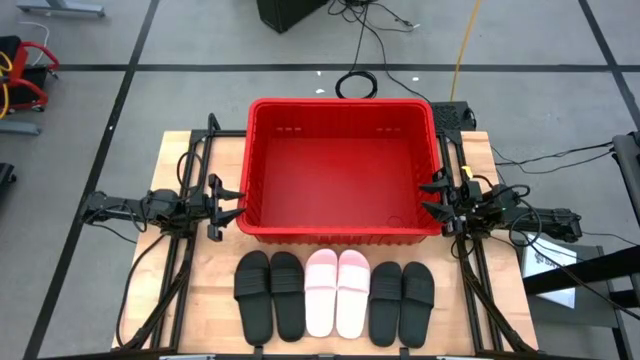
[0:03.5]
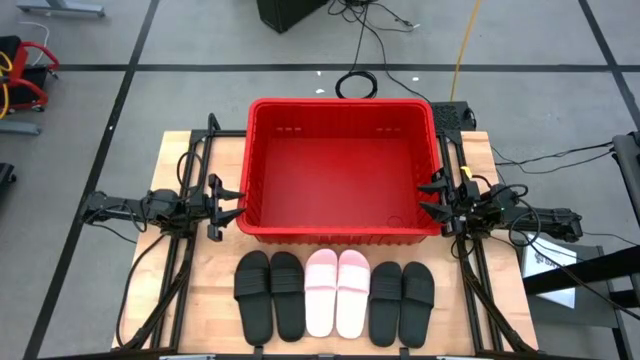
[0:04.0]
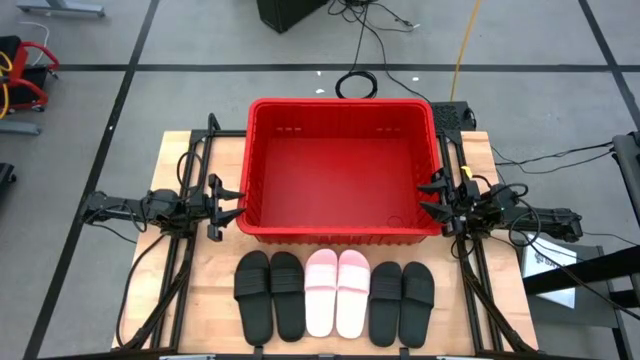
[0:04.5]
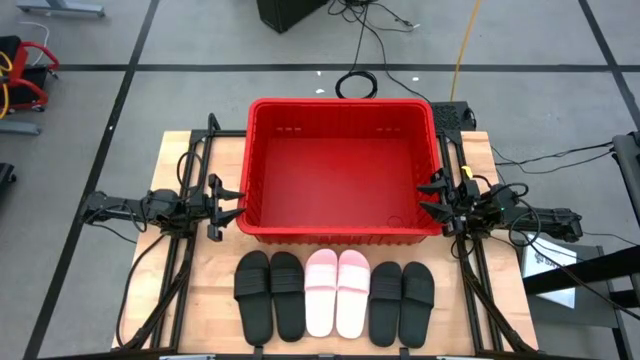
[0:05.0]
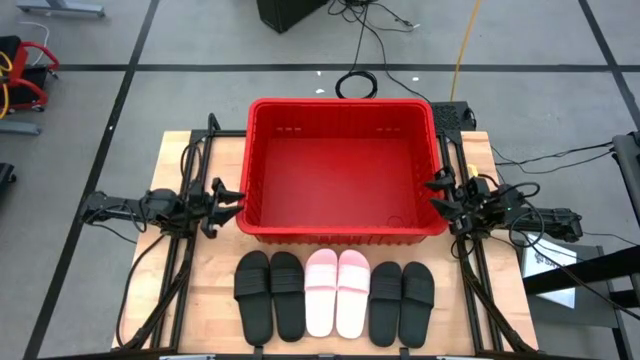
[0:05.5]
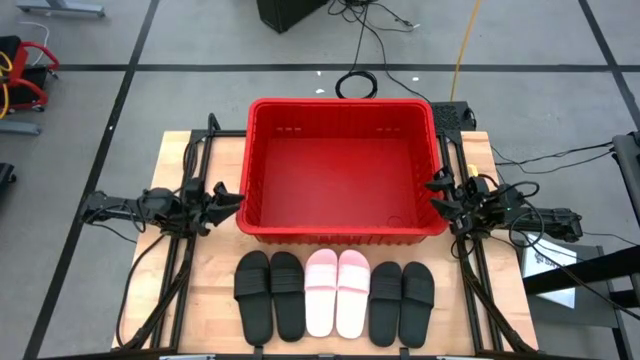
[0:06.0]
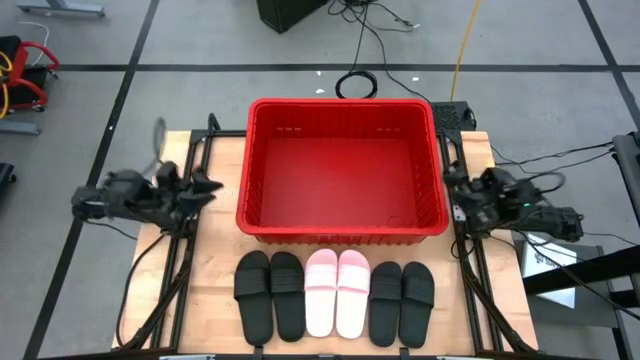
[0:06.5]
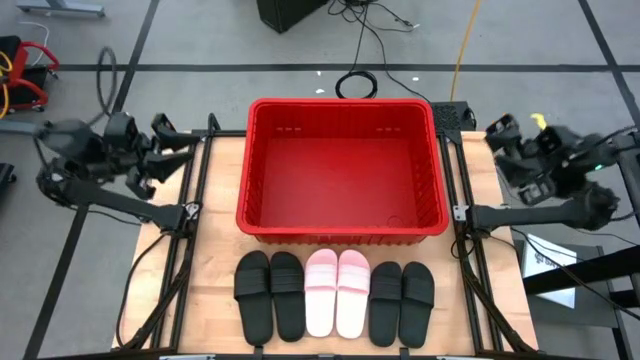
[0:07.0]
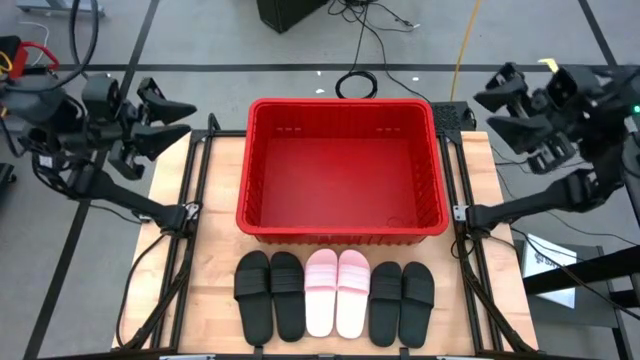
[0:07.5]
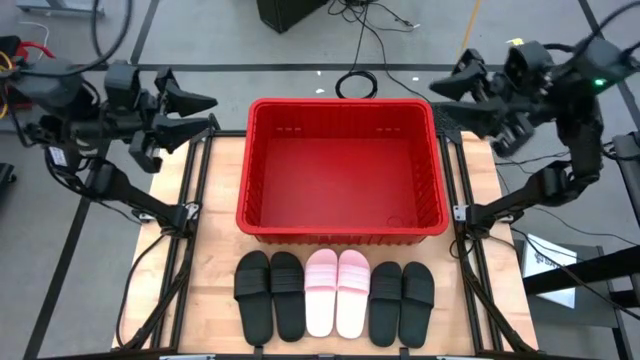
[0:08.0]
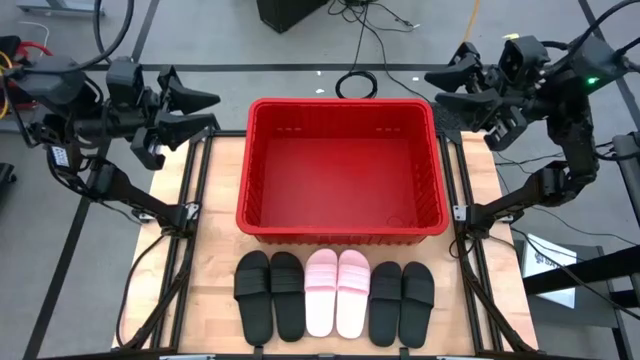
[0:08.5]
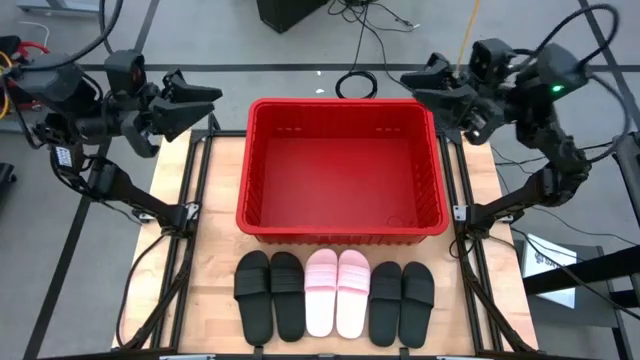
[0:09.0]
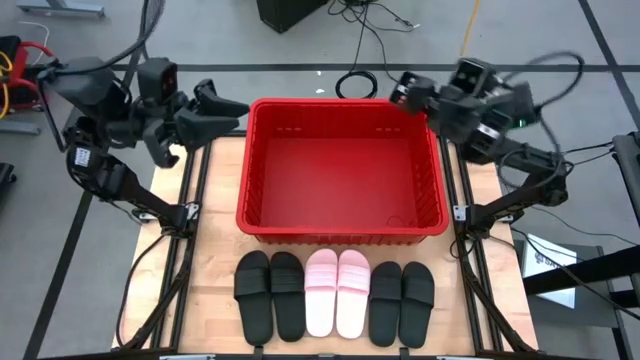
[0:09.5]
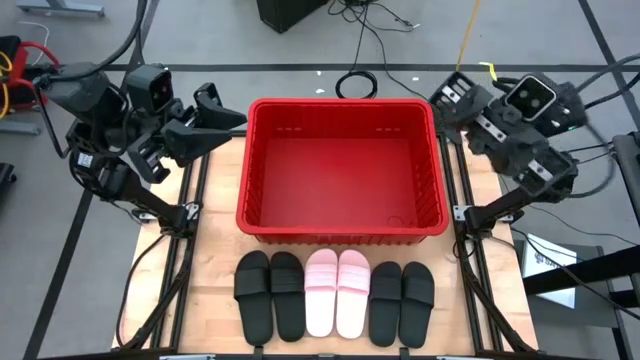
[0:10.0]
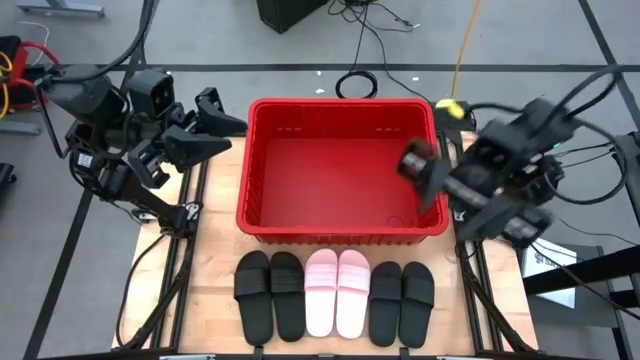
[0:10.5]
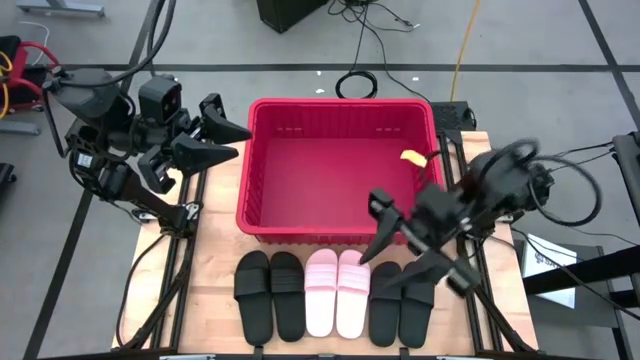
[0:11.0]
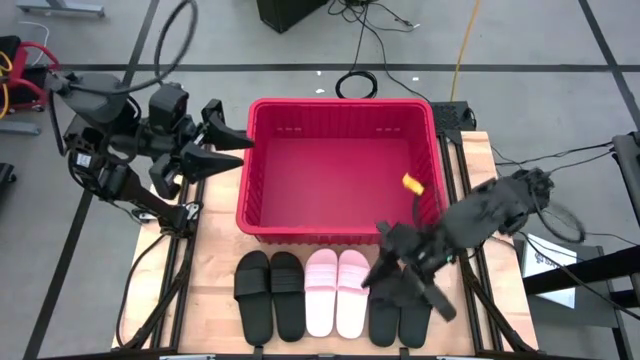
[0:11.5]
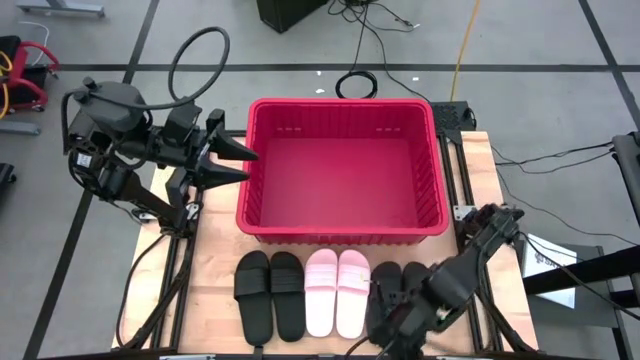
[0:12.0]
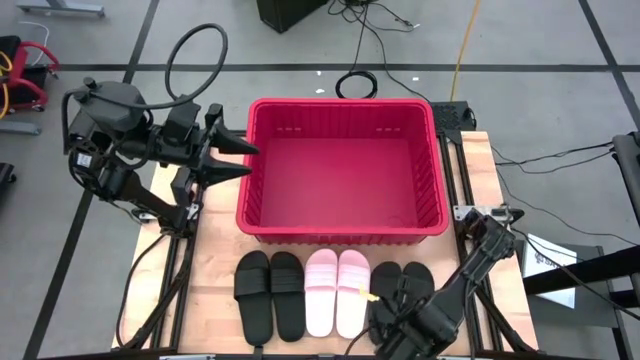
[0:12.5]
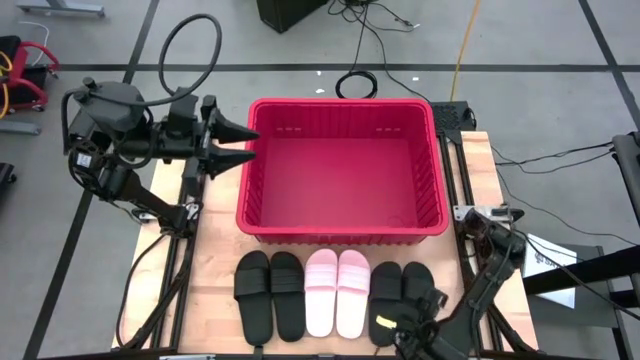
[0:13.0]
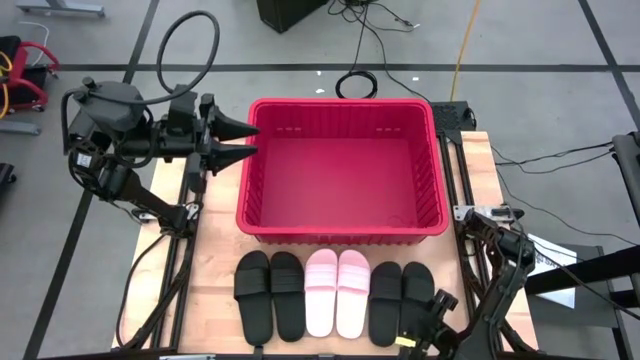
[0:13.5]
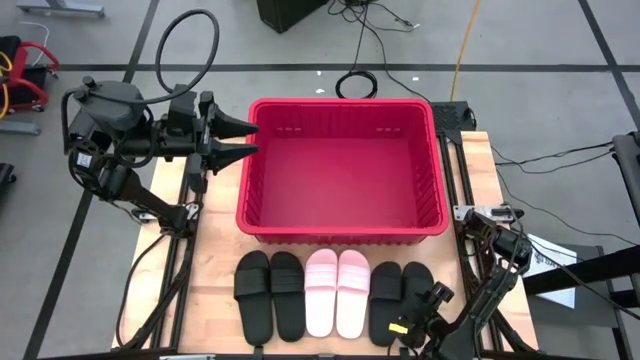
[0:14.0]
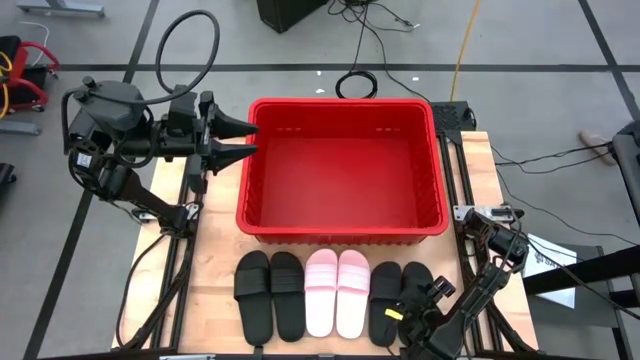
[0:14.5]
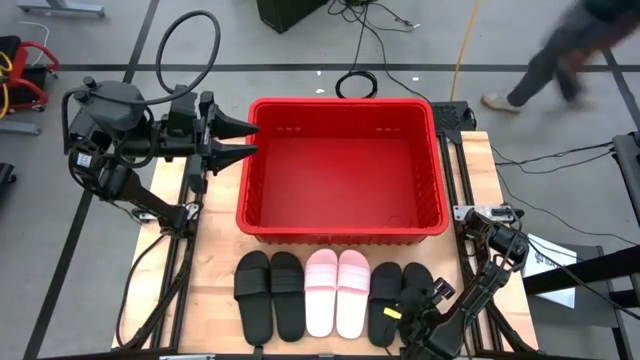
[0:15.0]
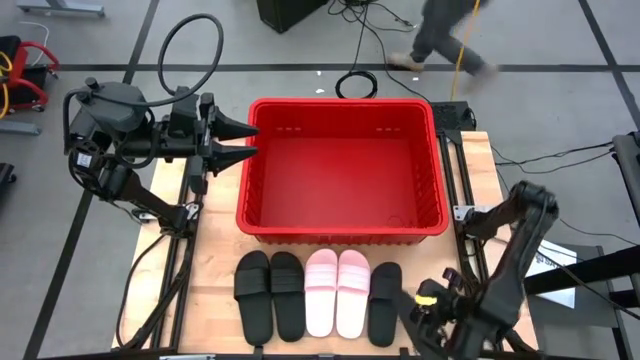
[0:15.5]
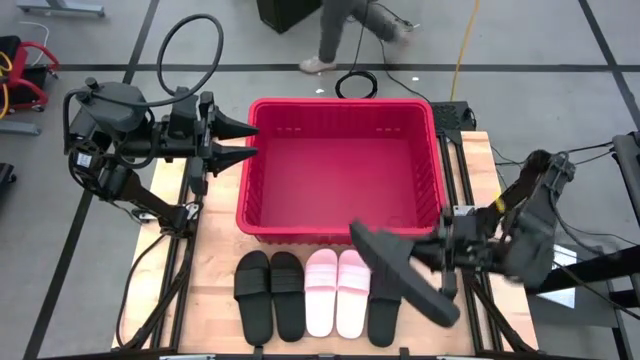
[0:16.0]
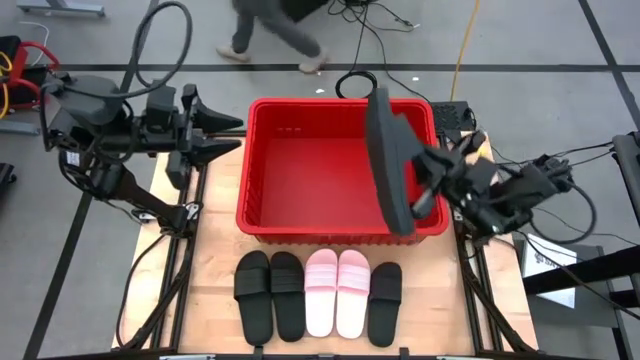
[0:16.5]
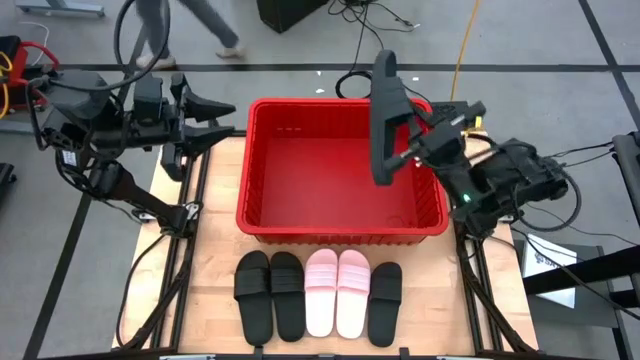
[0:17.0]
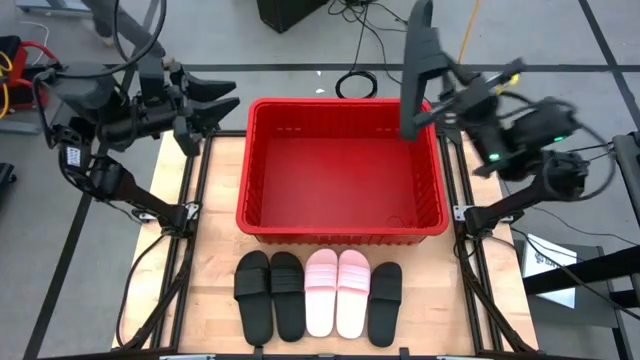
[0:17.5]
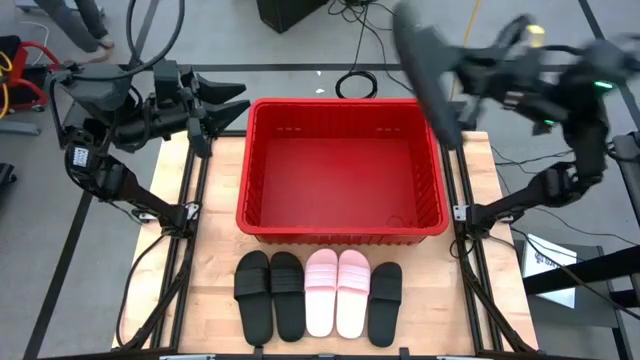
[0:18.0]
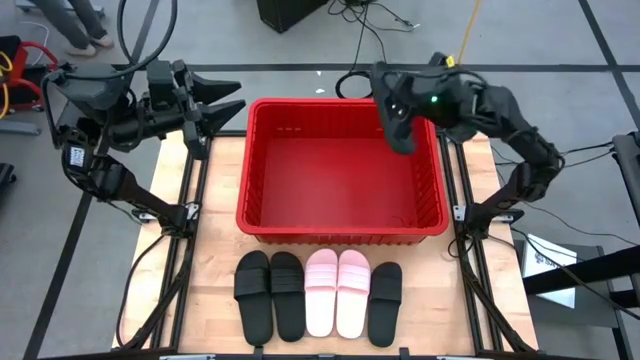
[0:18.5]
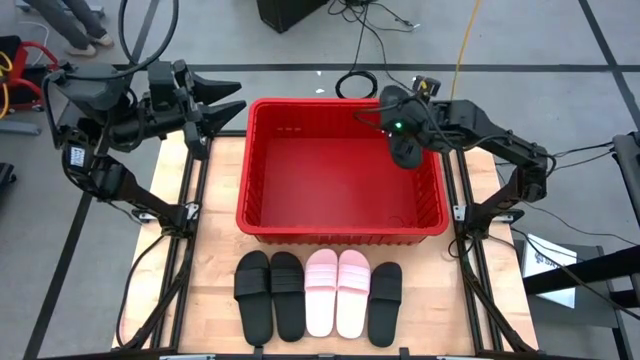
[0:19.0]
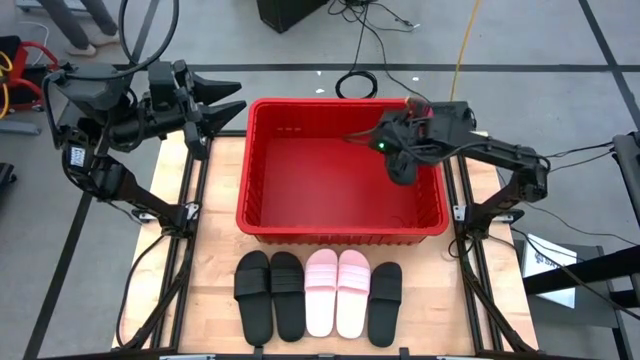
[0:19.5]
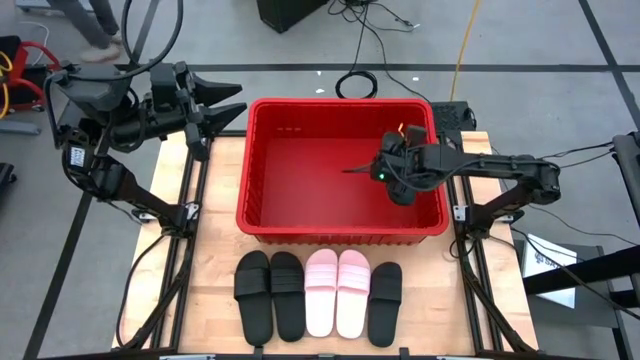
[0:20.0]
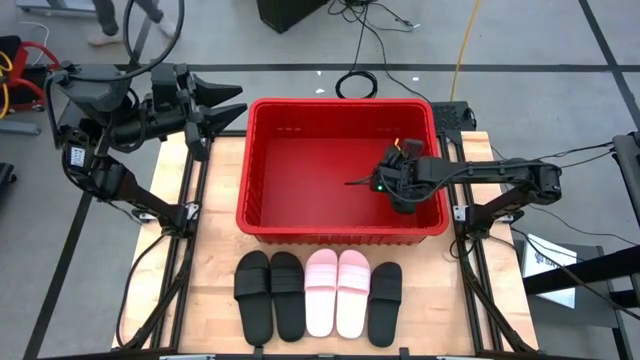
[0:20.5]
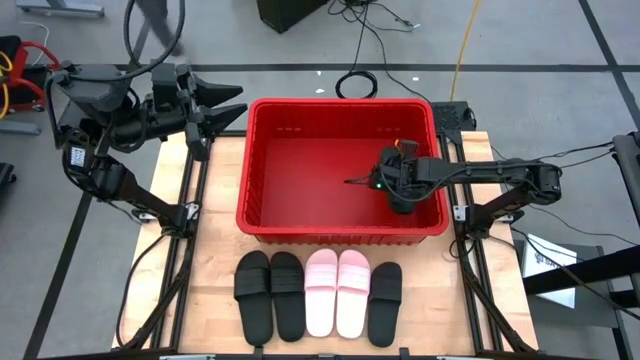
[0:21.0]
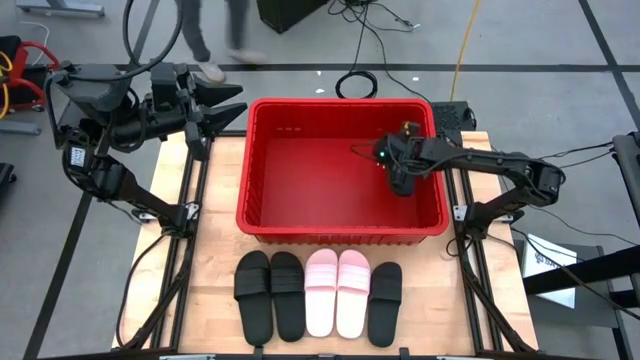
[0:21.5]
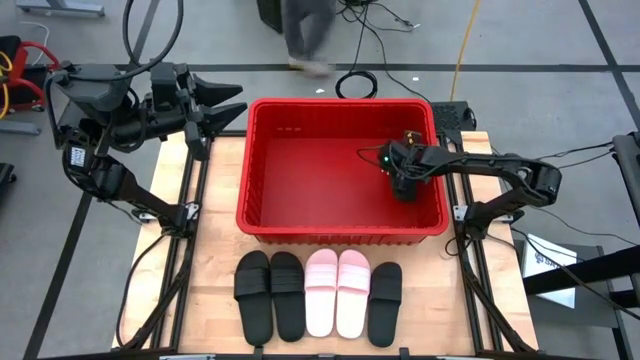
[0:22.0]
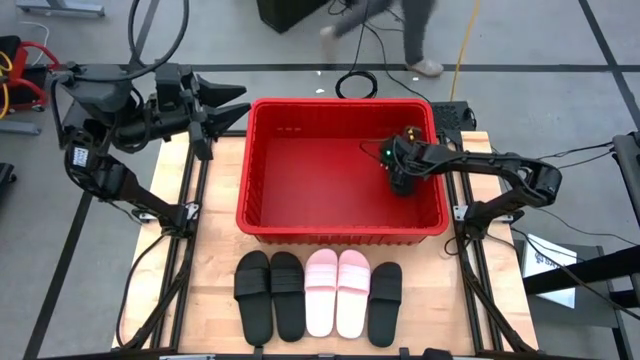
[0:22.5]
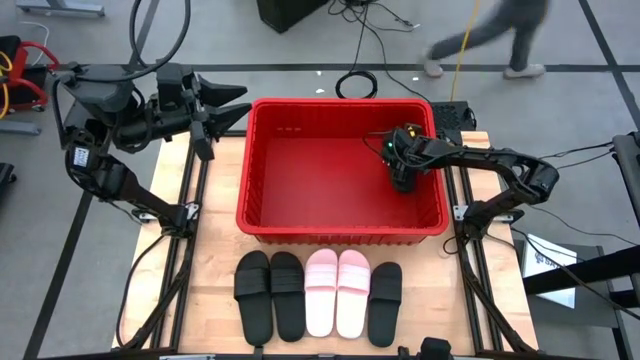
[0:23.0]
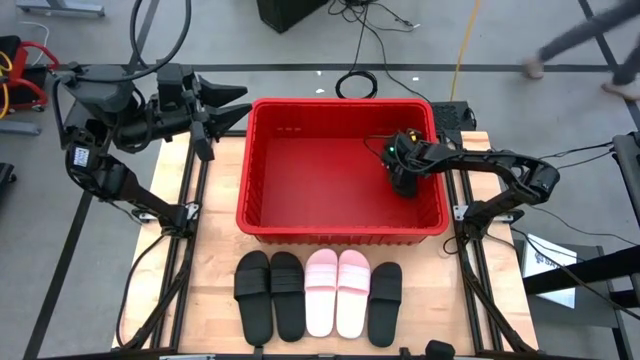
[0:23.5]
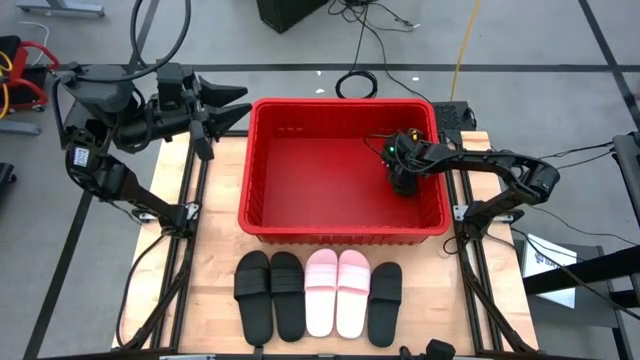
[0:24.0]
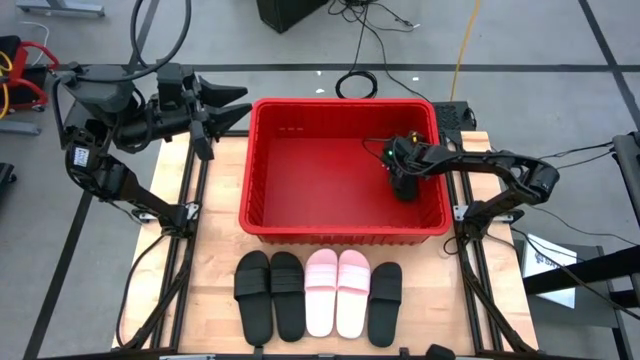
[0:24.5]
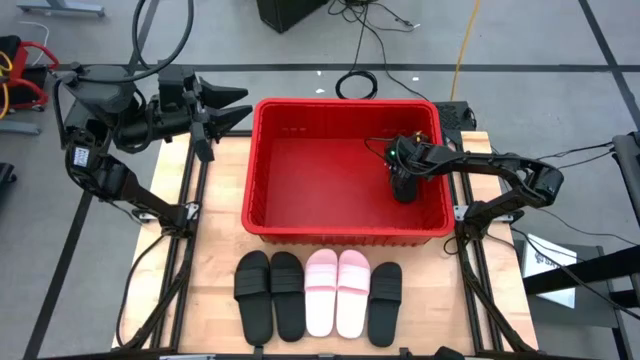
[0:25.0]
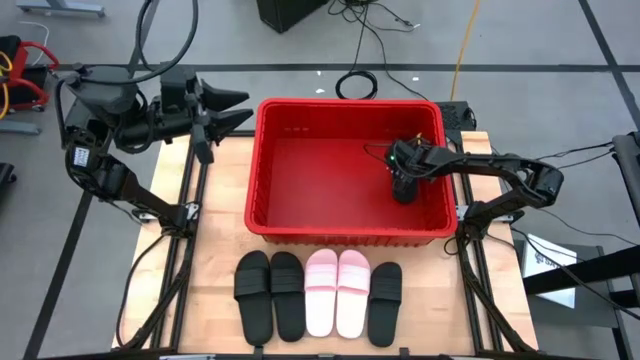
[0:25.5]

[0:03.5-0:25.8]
Task: Pick and place slides into bin
Put the black slipper into the red bin
